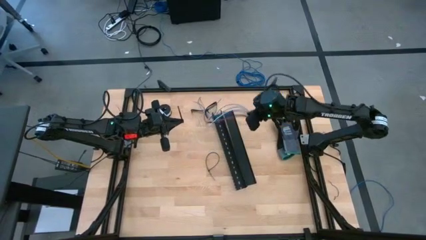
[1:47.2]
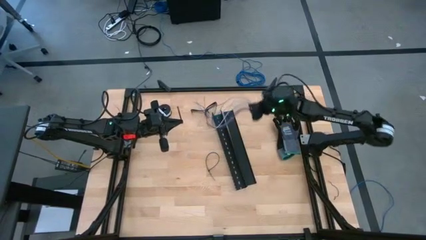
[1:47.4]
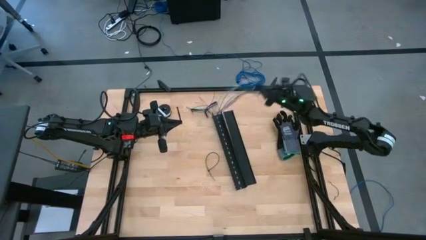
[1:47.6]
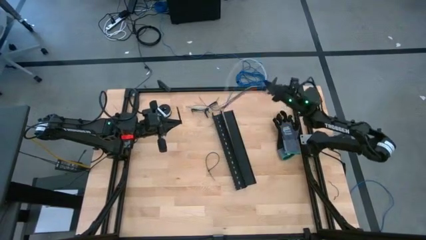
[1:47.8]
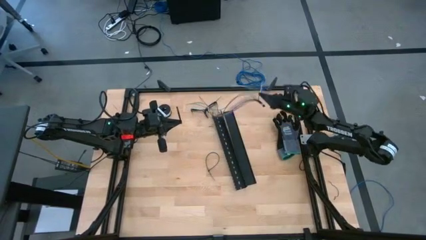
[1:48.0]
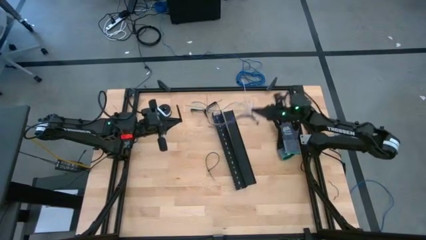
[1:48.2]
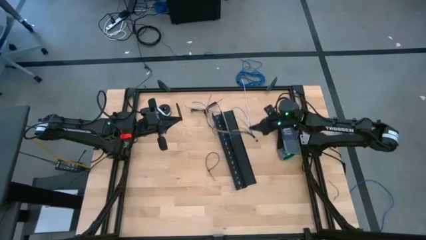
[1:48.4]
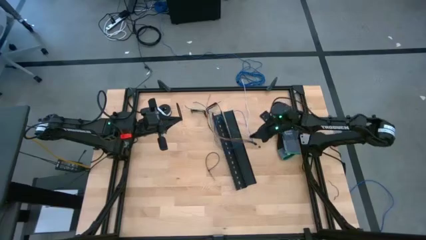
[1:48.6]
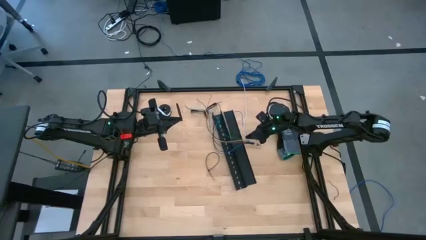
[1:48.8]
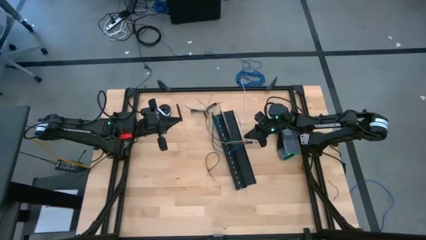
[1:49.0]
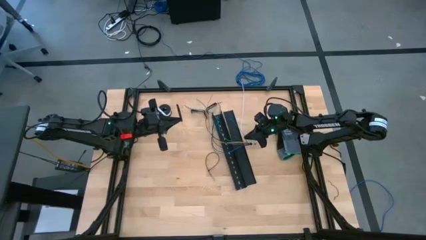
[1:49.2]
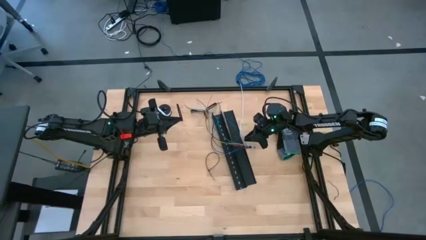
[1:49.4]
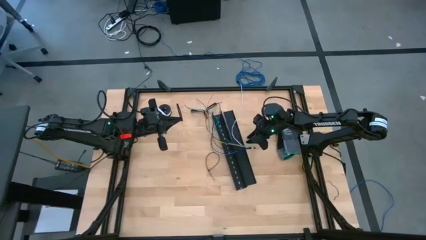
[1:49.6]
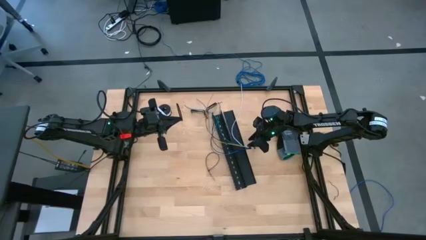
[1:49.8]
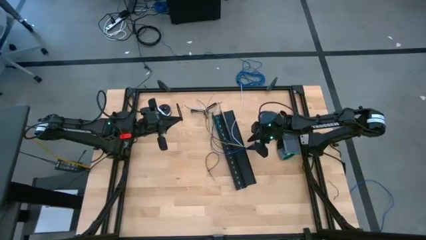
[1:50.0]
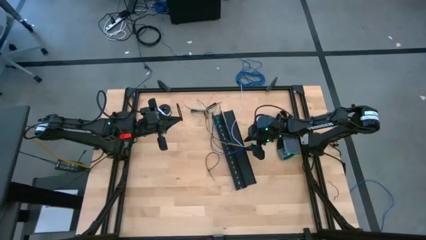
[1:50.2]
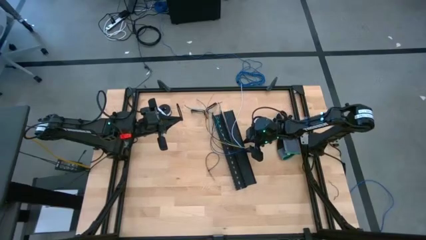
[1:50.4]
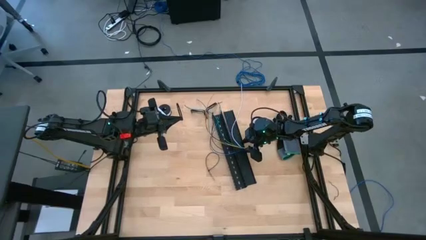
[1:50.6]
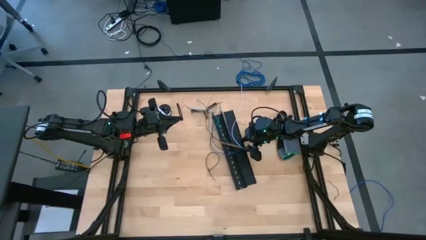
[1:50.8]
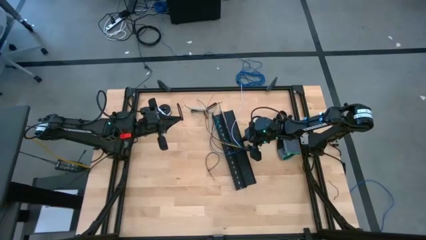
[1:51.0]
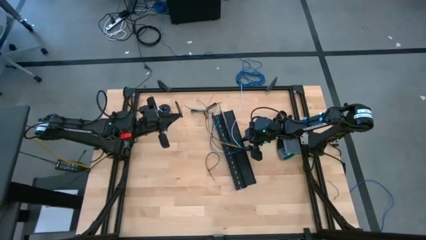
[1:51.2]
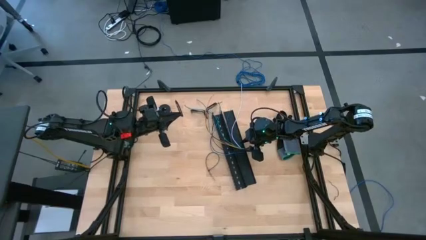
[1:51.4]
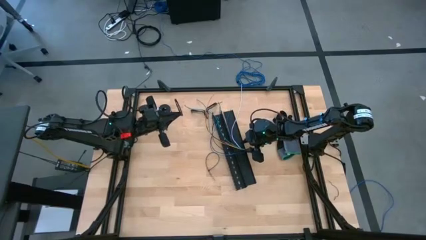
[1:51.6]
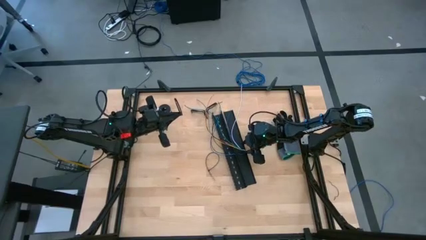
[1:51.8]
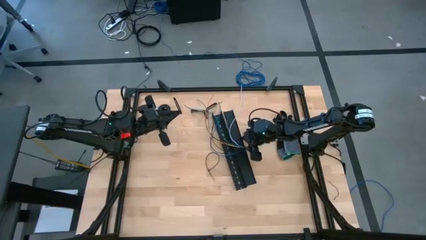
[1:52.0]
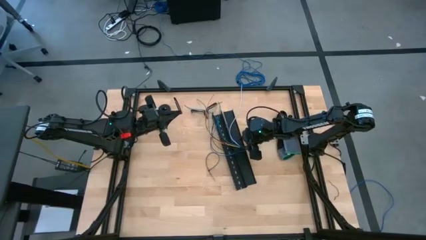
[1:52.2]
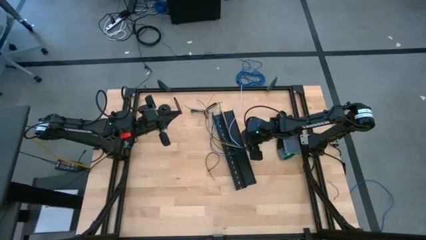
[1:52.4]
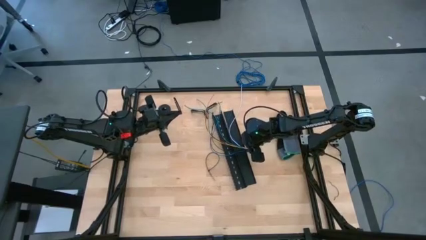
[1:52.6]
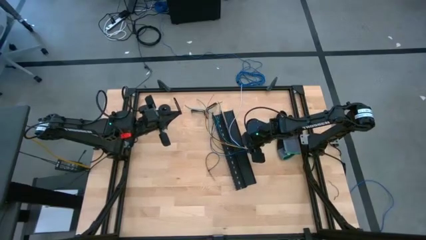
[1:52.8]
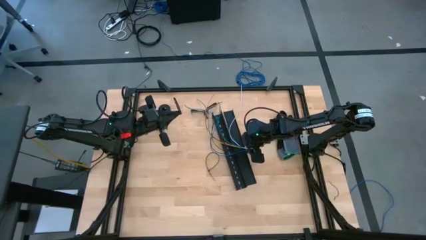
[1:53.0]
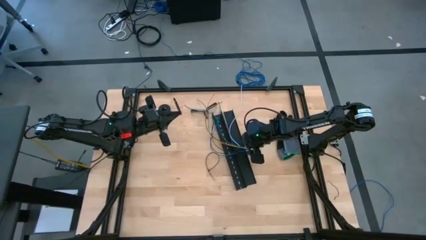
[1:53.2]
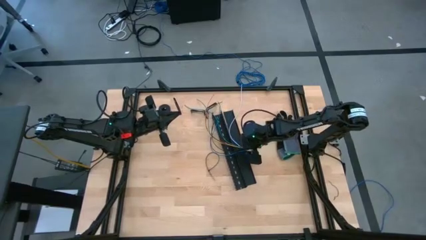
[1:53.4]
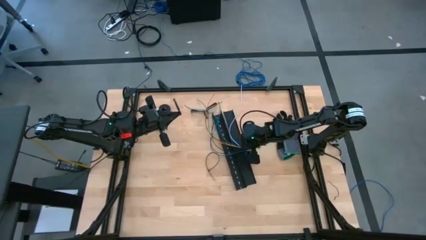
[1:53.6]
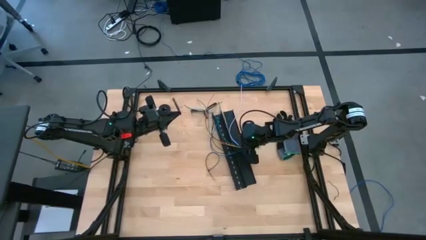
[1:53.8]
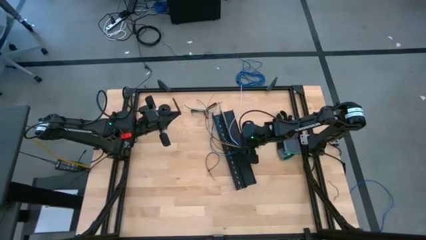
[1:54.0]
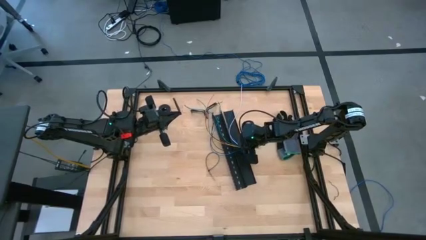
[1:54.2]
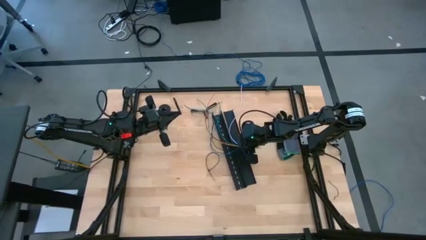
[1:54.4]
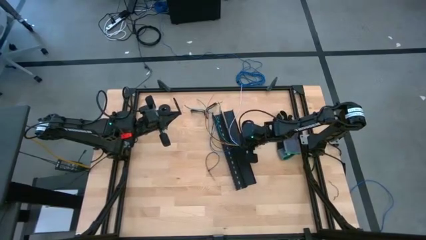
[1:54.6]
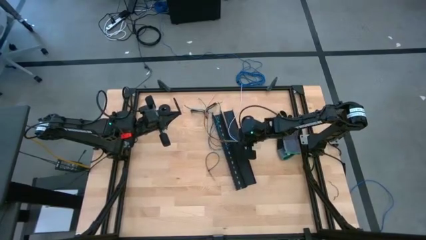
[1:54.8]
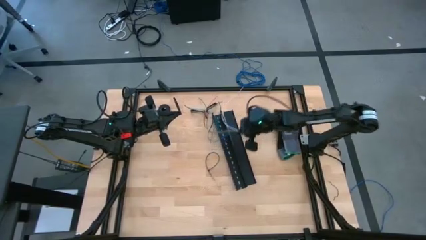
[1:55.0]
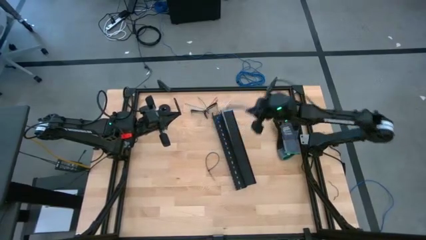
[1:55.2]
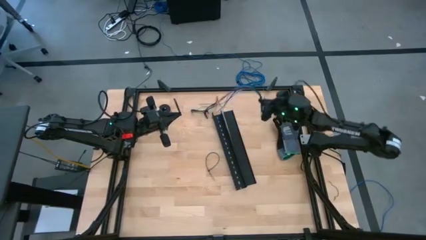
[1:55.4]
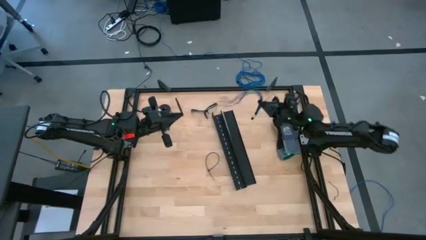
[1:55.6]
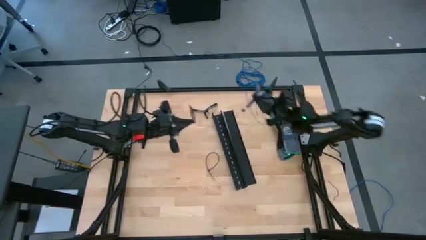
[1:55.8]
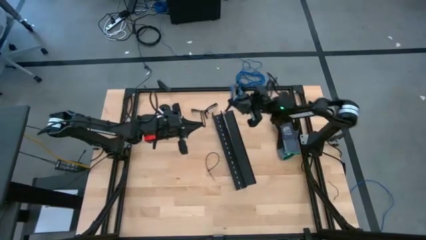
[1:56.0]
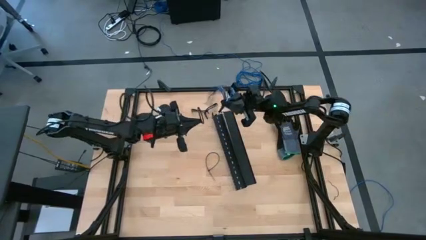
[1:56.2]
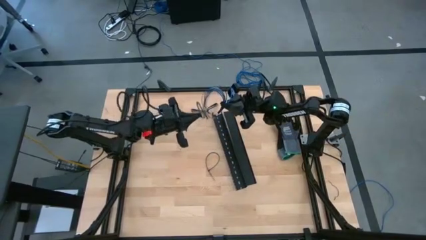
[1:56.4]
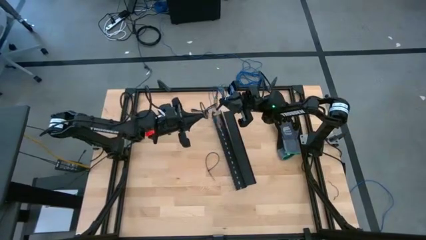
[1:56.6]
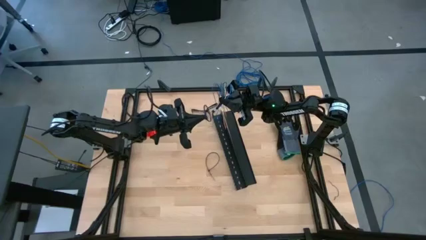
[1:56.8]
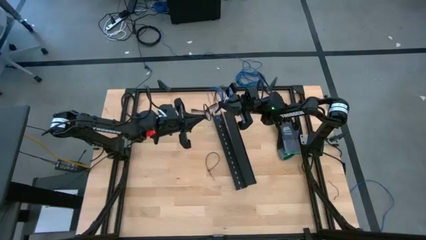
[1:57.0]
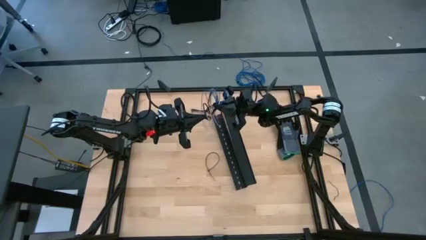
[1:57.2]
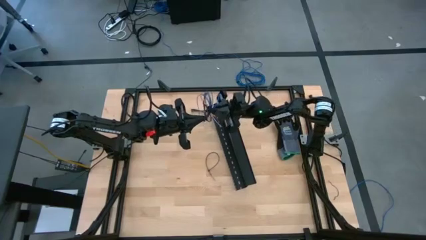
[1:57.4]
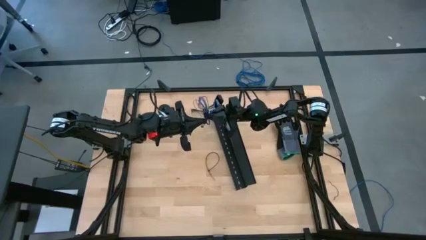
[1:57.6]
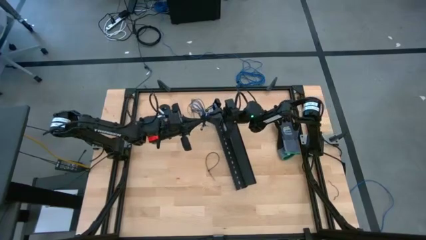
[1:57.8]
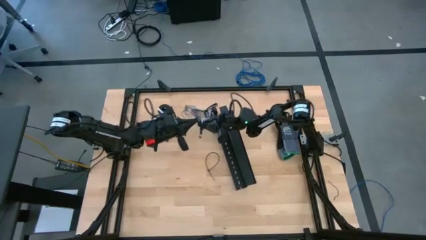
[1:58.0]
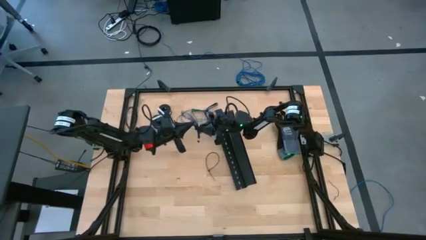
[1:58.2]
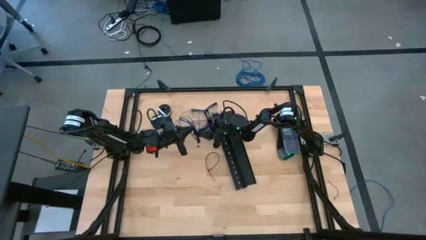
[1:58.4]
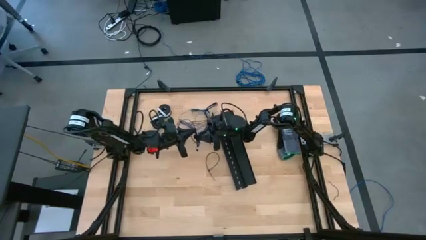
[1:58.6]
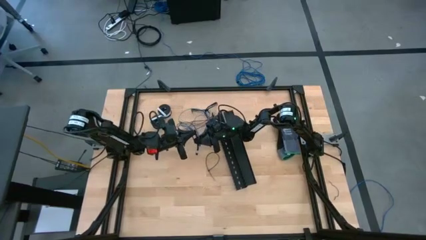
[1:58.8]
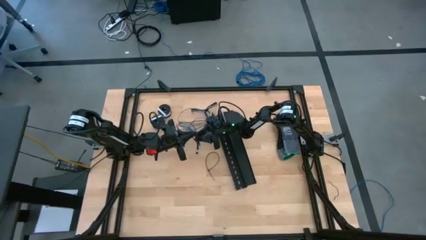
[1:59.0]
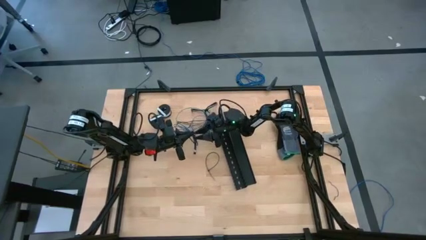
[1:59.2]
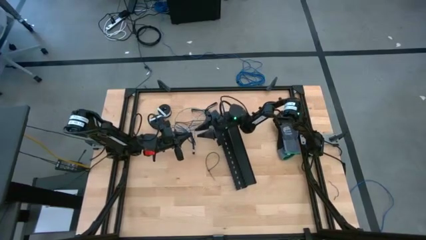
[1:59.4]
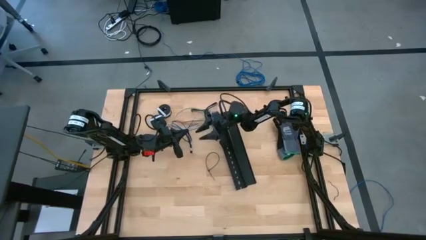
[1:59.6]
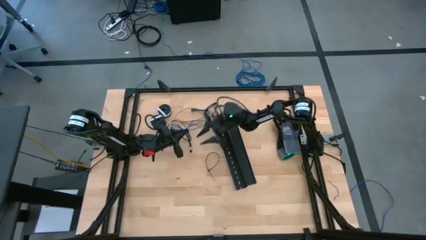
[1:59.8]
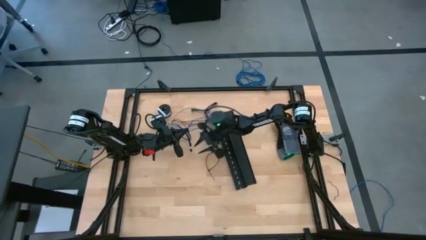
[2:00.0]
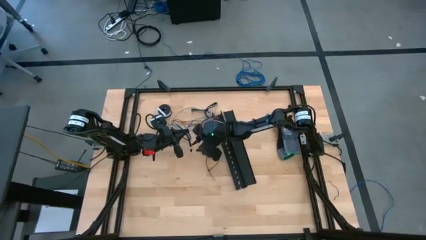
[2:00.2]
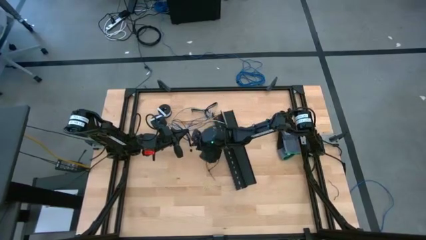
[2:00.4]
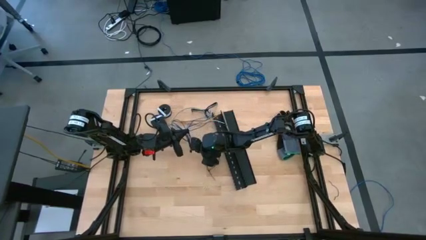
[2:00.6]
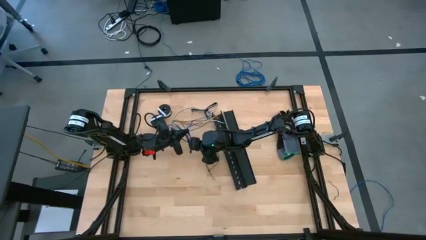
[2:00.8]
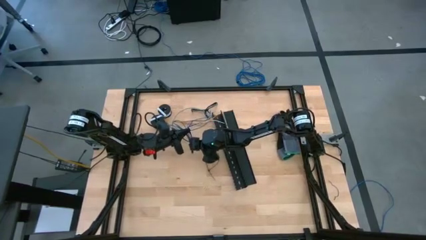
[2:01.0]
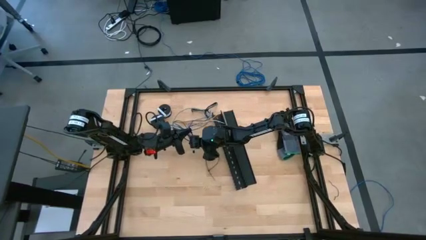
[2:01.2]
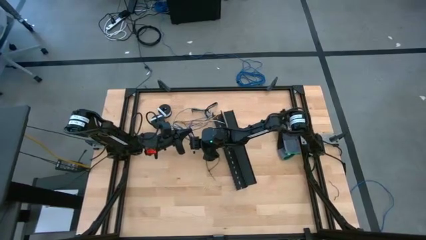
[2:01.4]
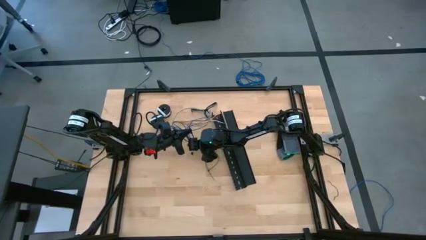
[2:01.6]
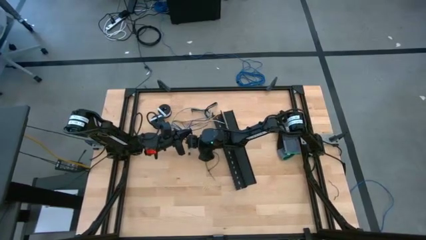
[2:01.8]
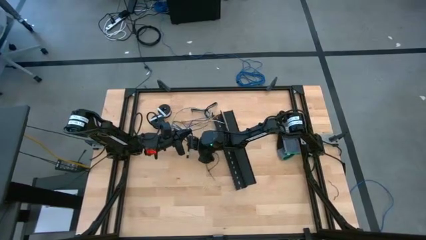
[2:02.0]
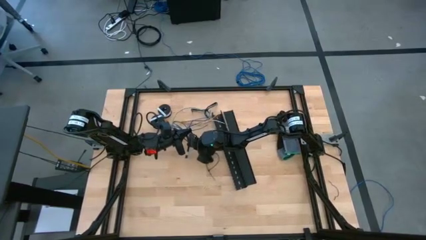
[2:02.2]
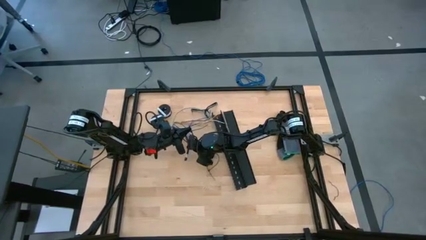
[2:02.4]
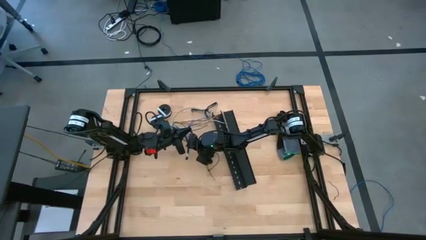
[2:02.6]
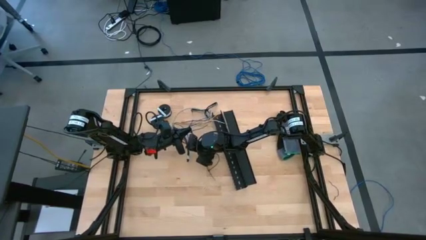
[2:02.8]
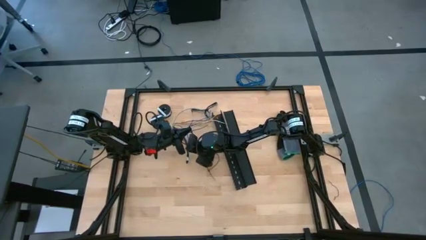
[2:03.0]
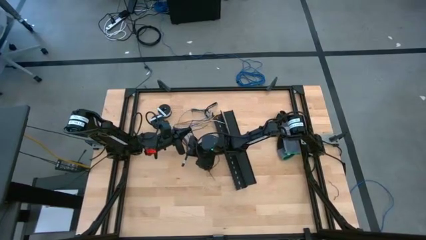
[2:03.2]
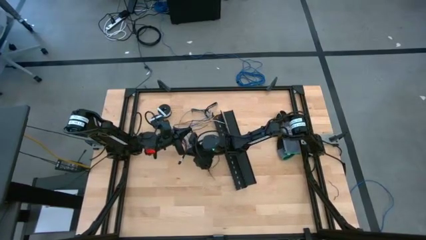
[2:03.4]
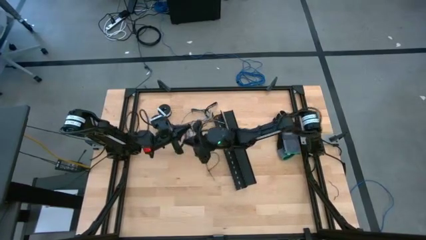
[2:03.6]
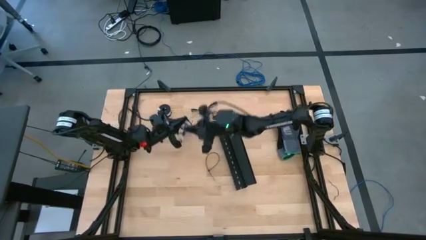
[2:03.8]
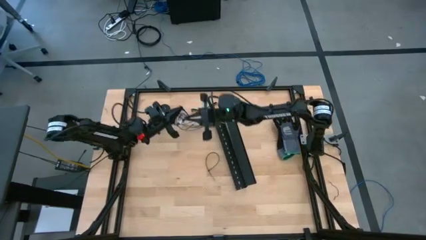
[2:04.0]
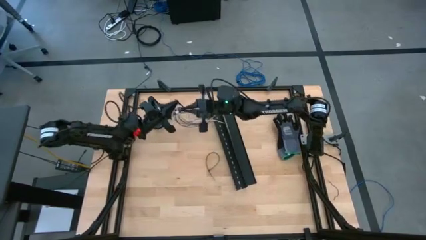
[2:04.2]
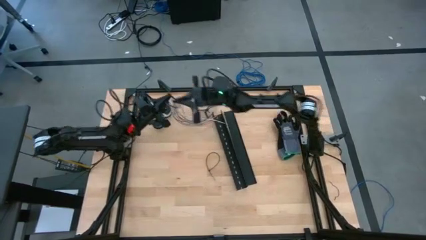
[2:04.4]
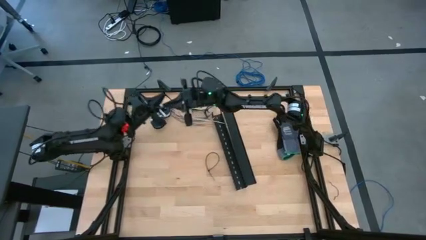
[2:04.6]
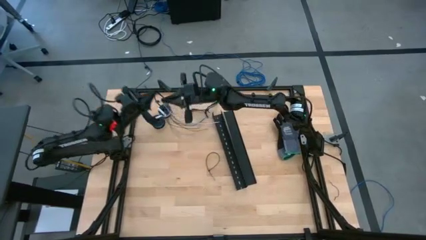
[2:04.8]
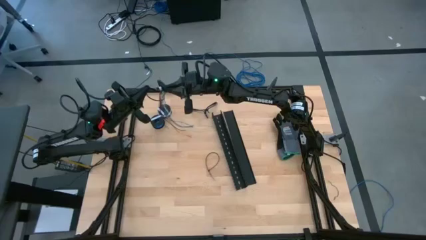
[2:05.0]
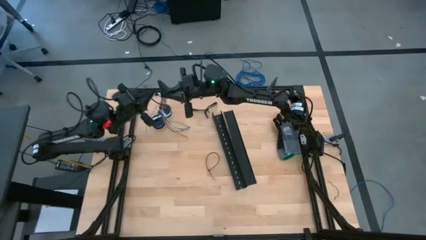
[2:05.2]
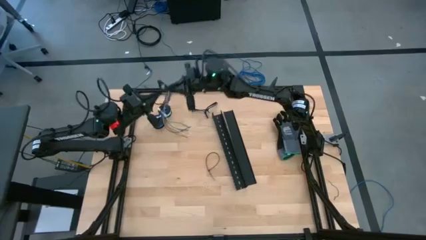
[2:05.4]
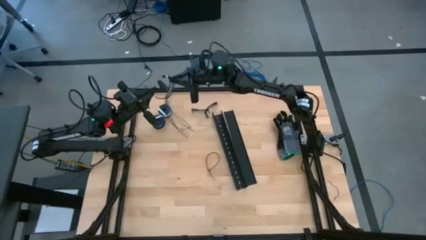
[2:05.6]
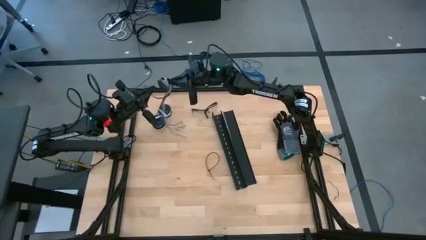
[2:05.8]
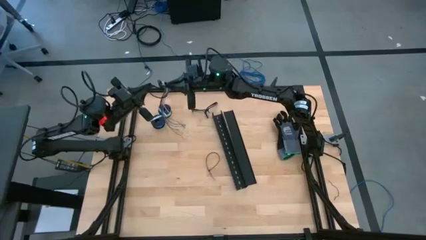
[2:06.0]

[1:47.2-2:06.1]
Task: Ziptie cables
Wrap the black zip tie on the cable
